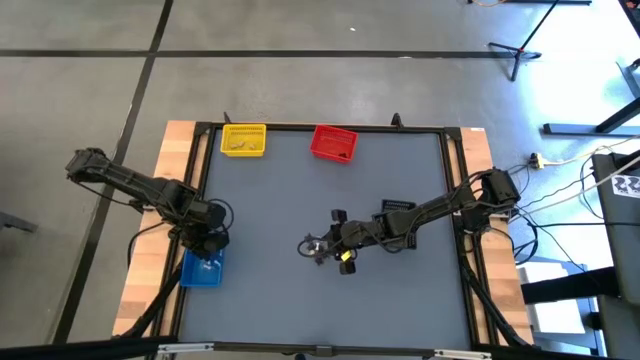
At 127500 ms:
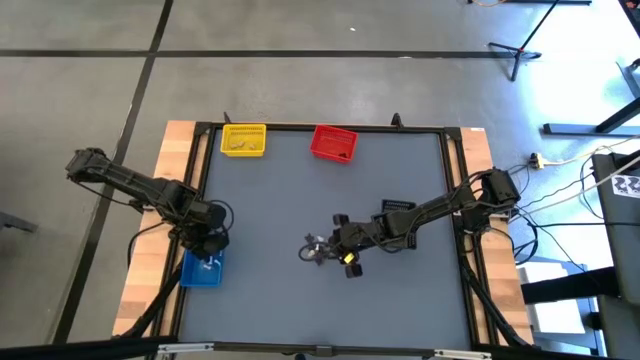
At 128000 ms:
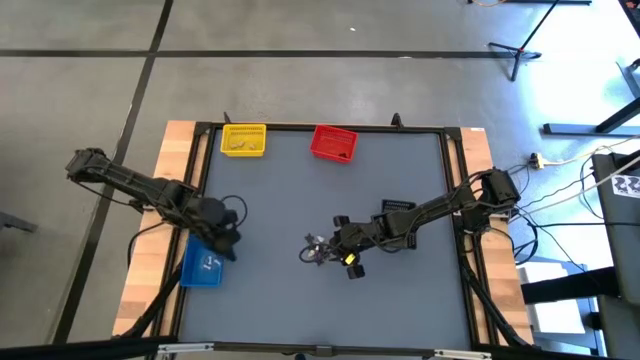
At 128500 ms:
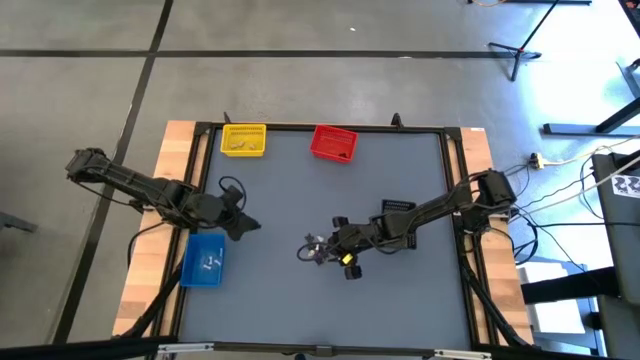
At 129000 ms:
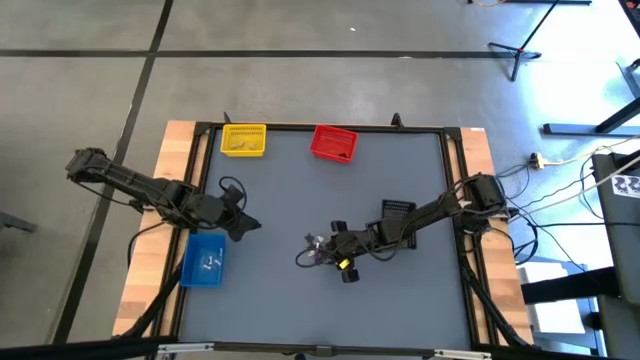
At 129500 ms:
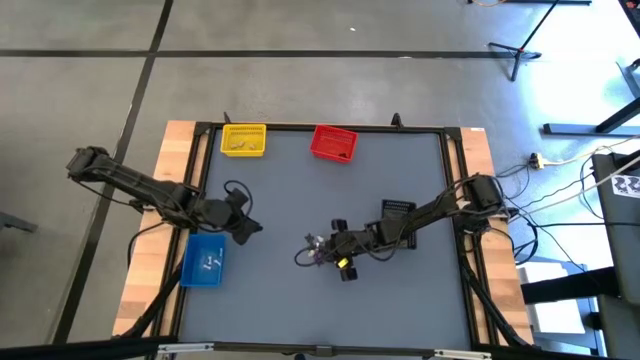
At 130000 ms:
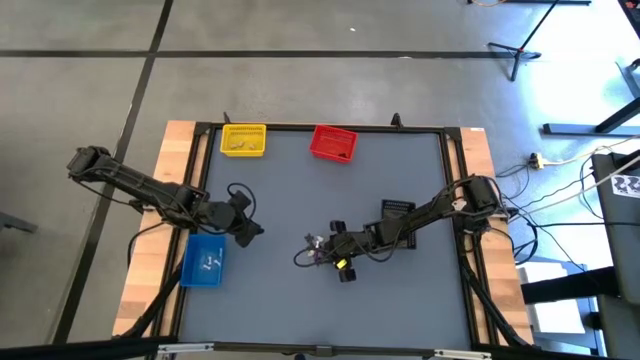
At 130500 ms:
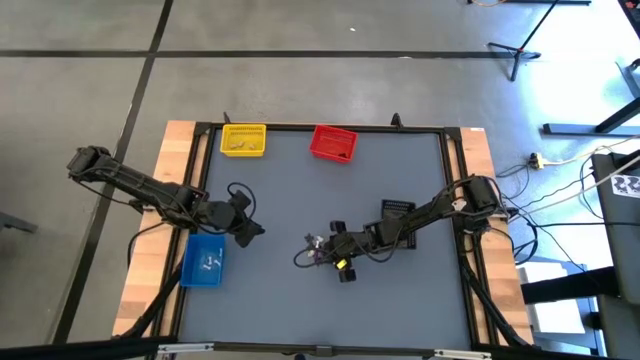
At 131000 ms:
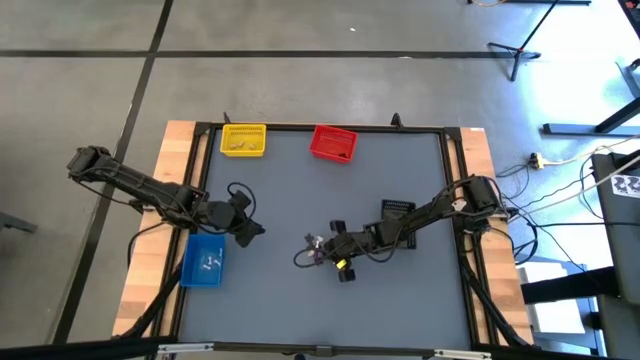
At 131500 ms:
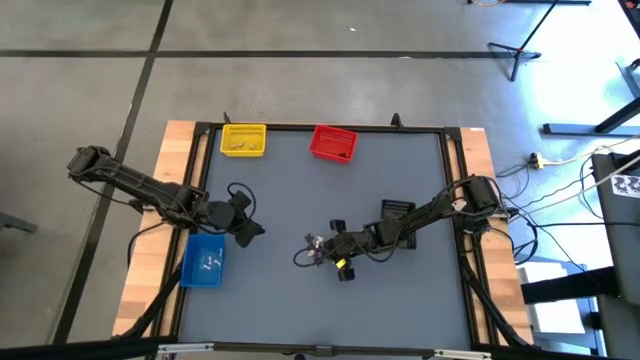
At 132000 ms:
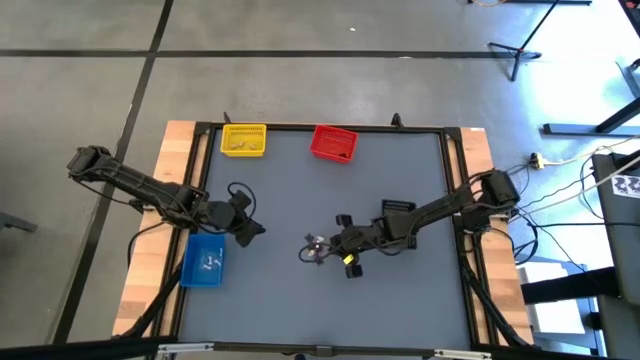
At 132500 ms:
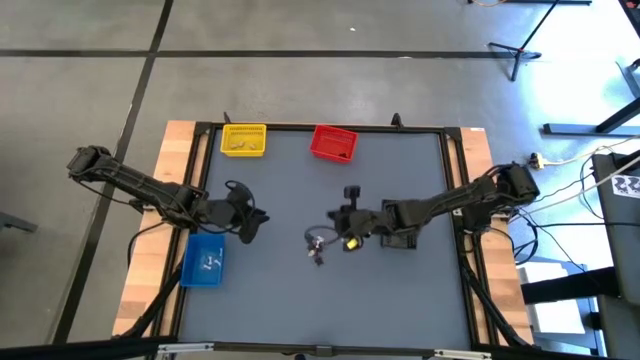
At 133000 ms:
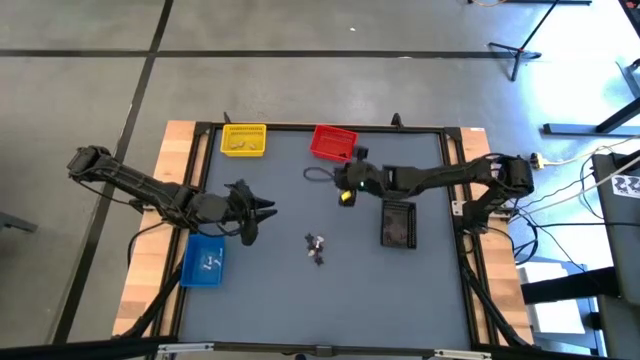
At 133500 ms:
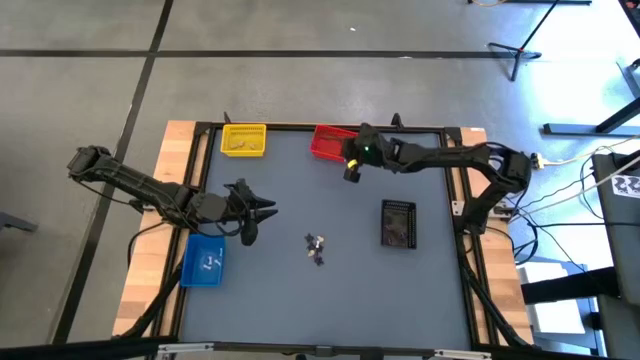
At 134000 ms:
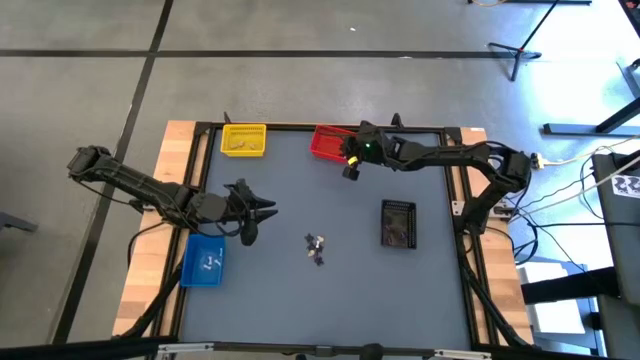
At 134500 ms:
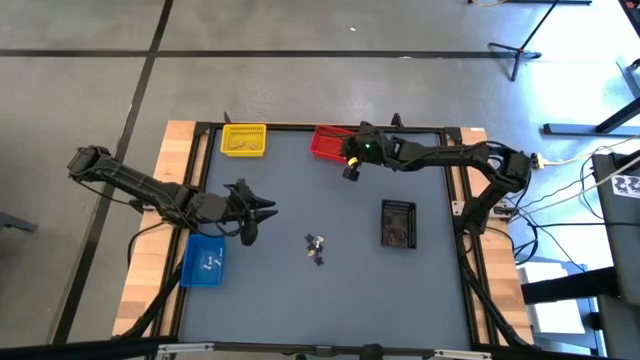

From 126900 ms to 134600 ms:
Task: Sort Halloween decoration
Put the black spider toy into the red bin

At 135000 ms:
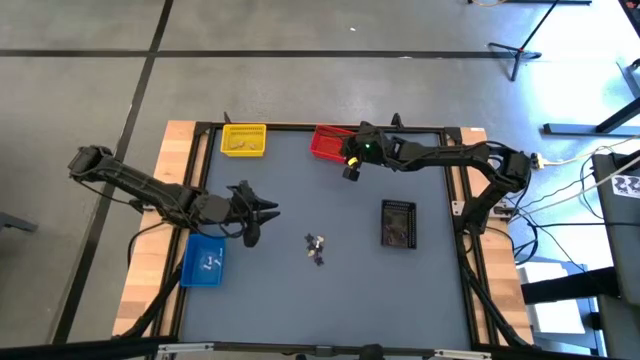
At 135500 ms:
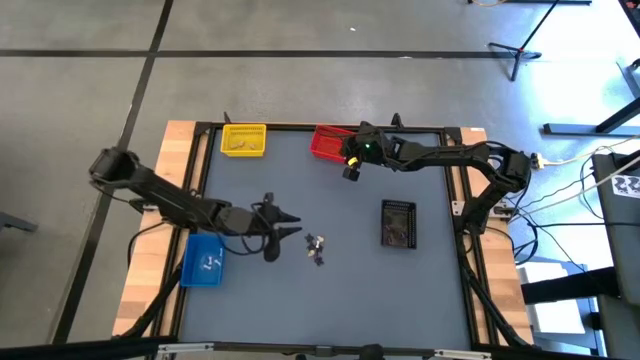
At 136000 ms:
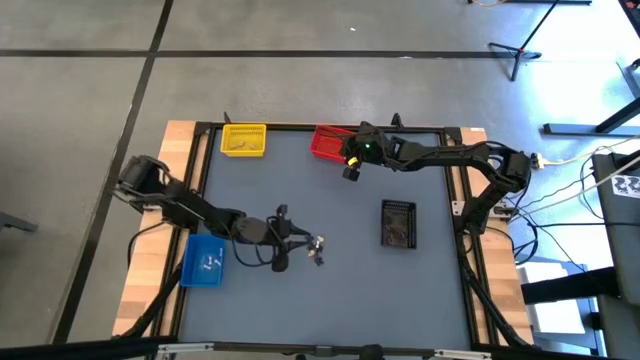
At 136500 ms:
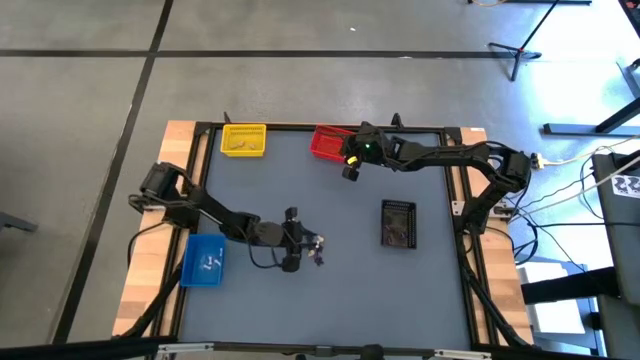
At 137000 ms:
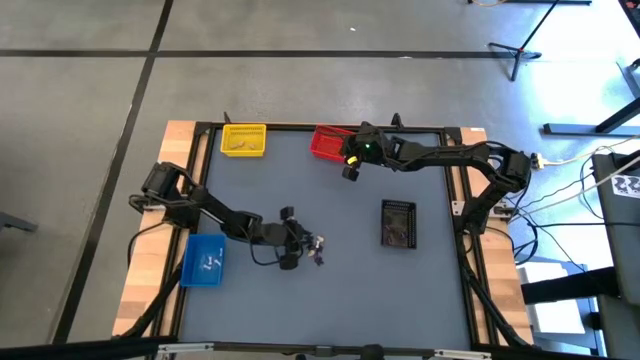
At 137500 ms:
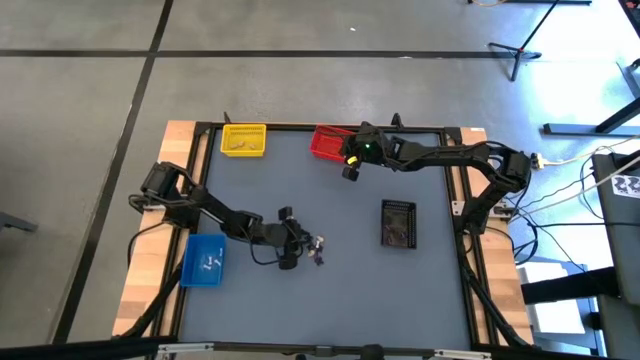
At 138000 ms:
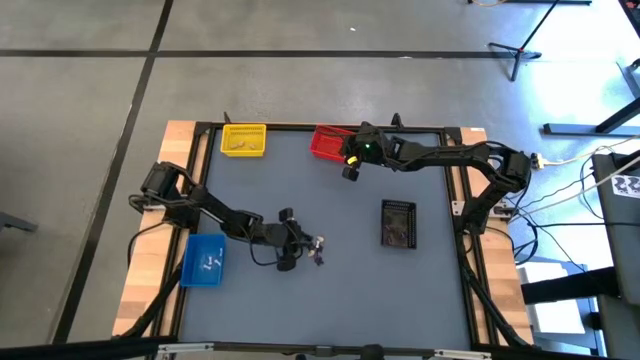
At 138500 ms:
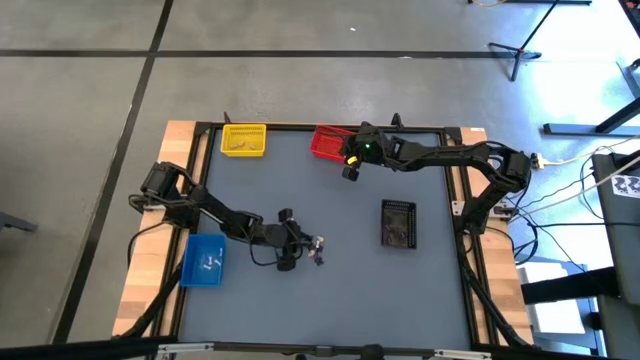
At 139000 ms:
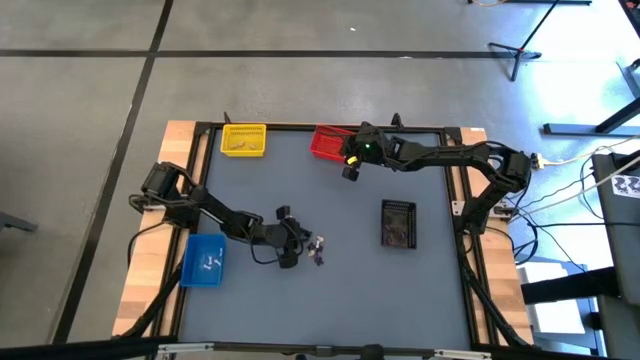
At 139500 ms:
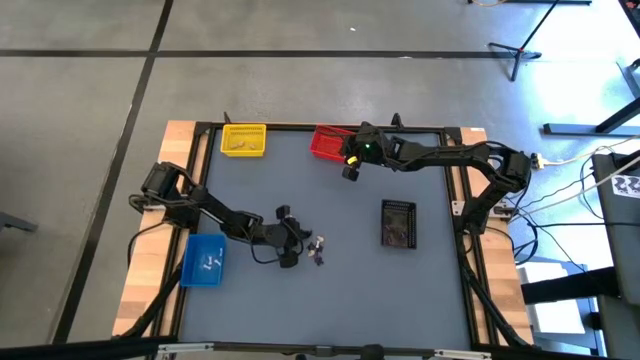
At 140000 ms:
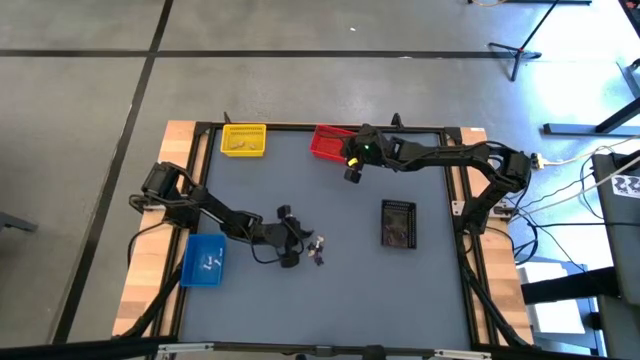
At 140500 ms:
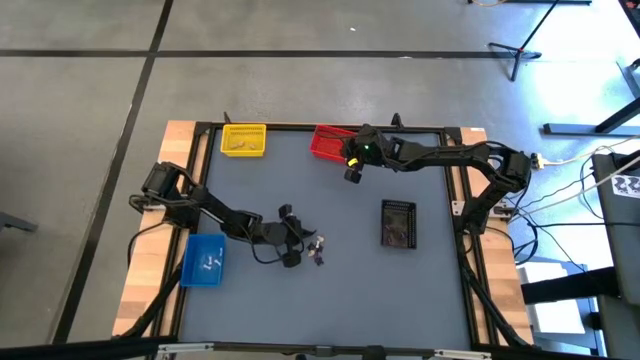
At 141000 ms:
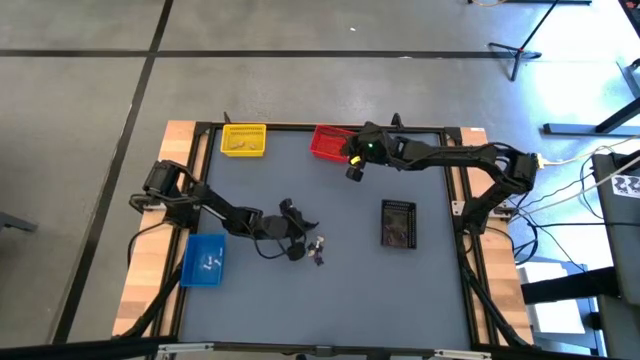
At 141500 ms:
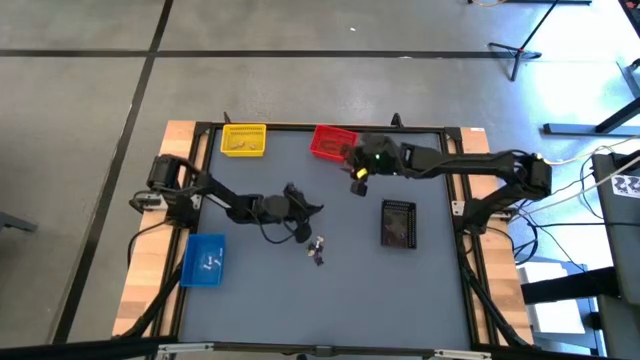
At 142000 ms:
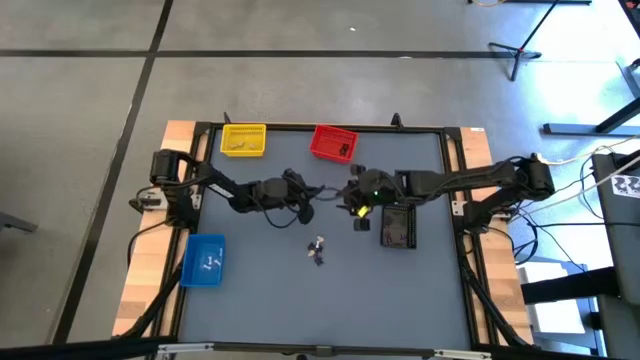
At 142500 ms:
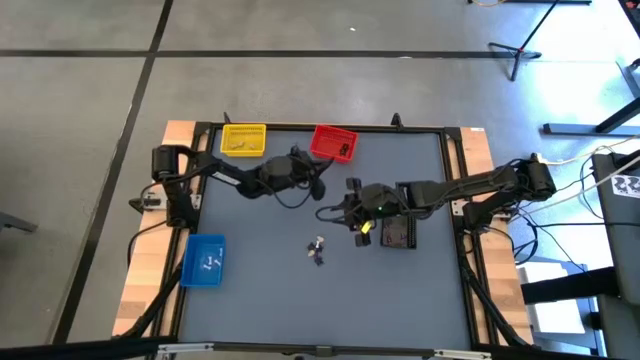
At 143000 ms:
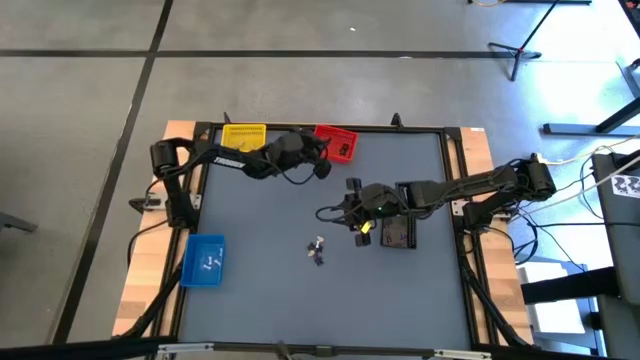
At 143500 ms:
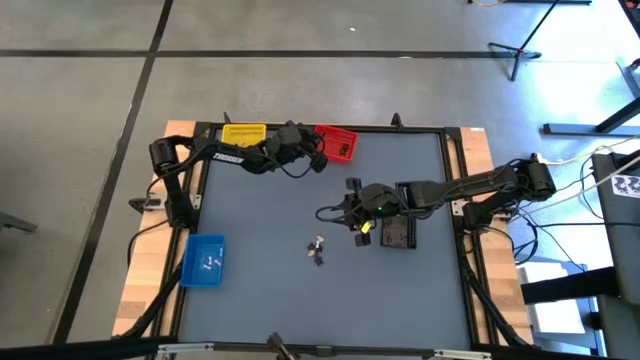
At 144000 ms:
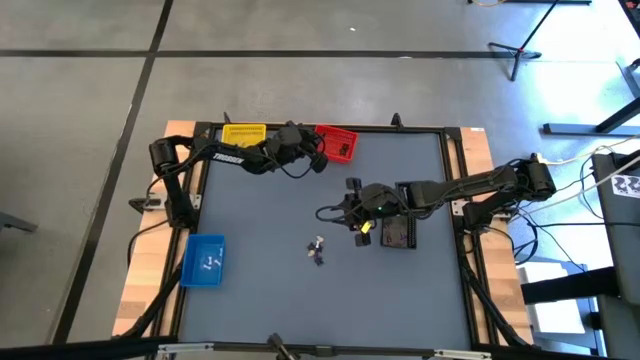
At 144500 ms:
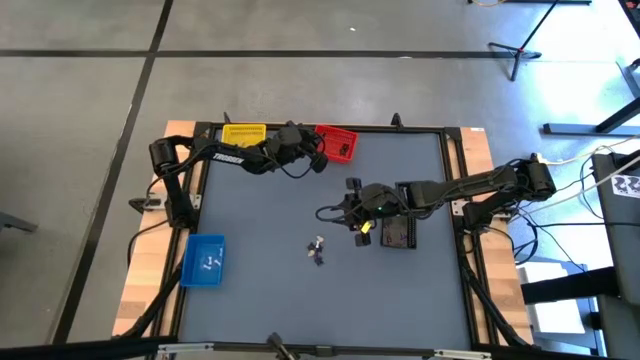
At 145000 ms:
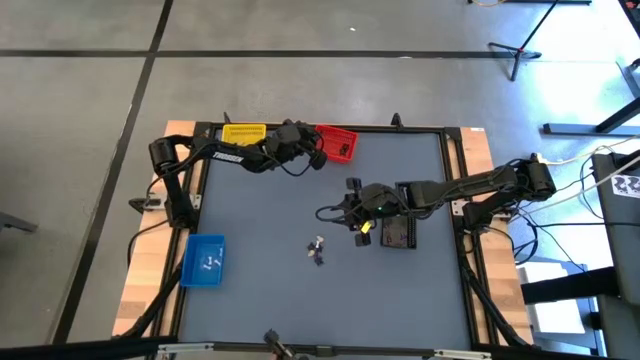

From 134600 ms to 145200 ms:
Put the black spider toy into the red bin

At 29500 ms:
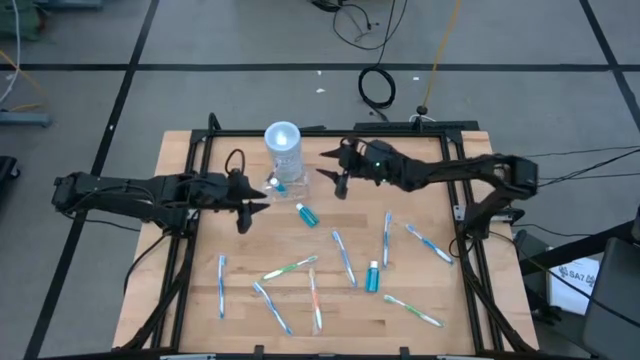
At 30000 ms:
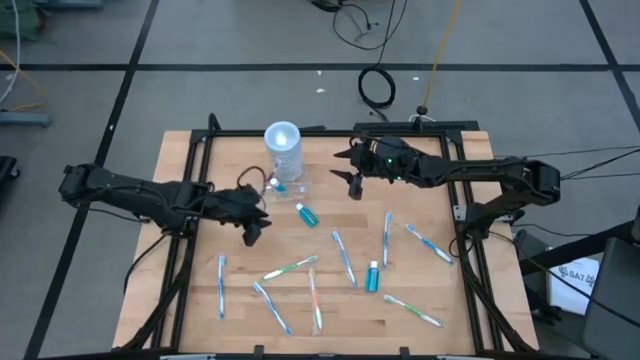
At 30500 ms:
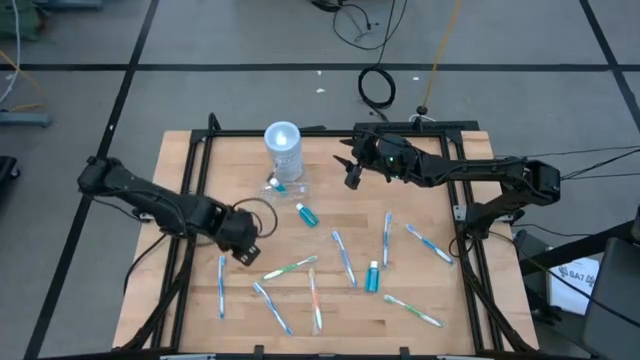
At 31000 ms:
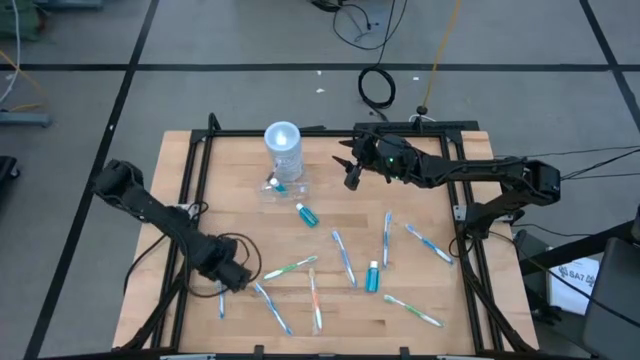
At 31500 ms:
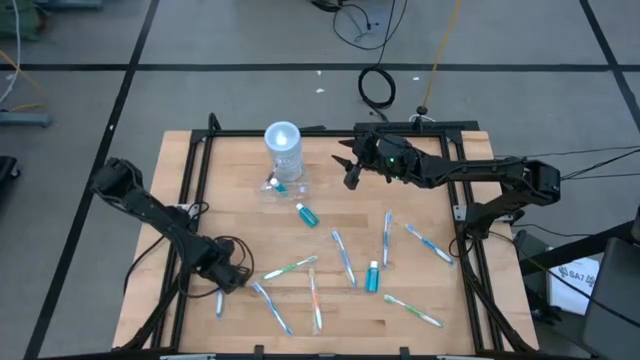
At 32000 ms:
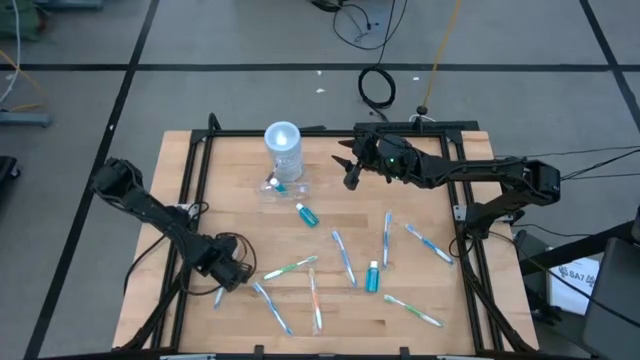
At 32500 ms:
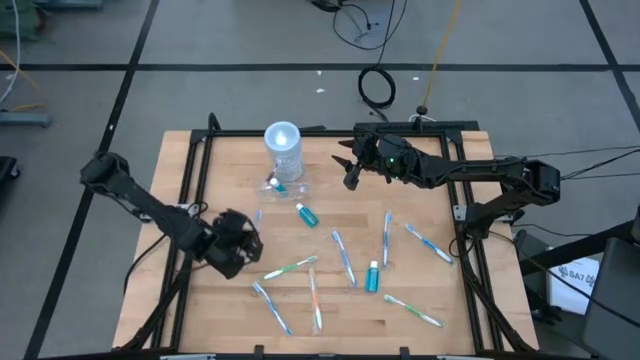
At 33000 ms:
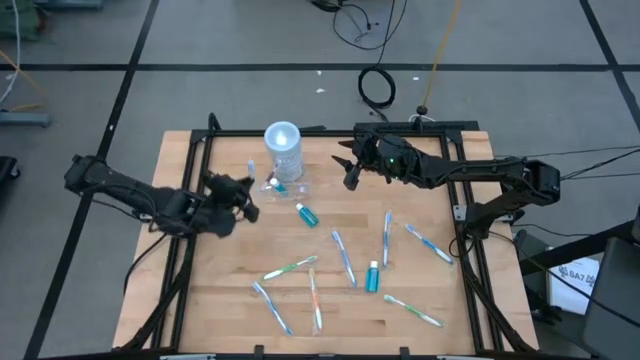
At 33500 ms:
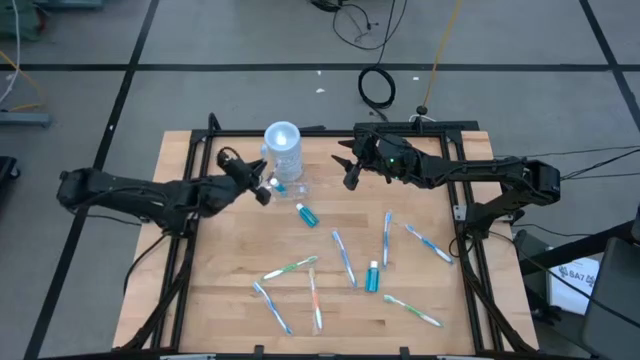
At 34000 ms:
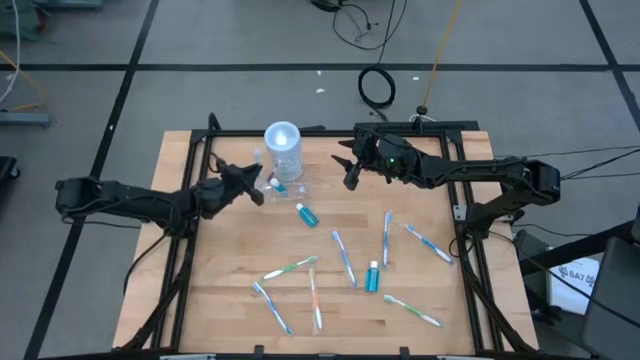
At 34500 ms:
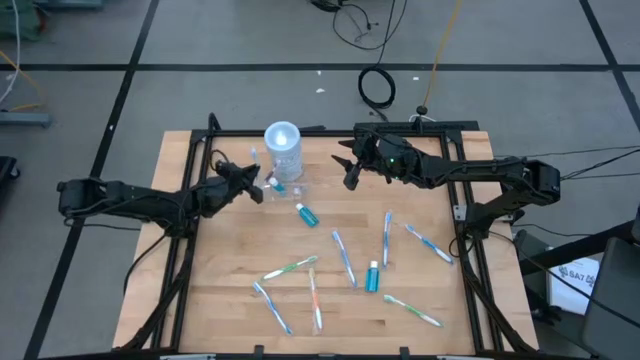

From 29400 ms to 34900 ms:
Task: Pick & Place toothbrushing station
Put the blue toothbrush into the transparent organizer
